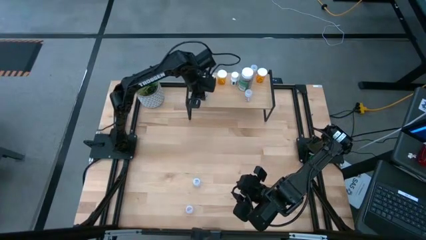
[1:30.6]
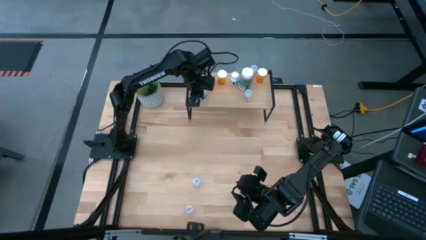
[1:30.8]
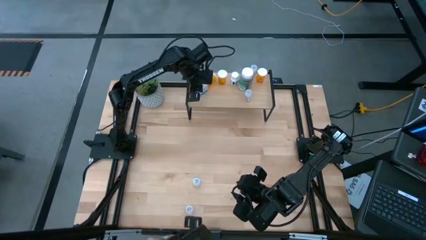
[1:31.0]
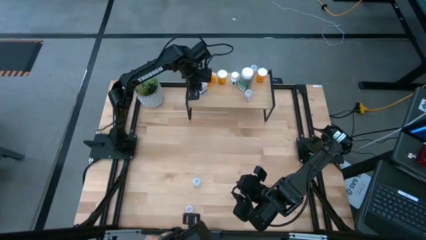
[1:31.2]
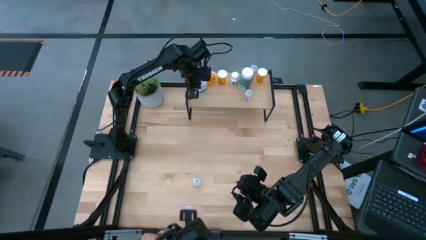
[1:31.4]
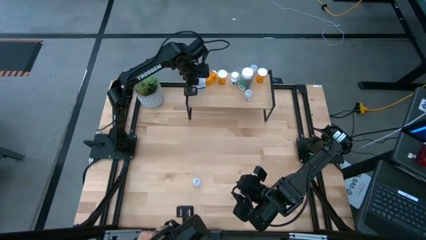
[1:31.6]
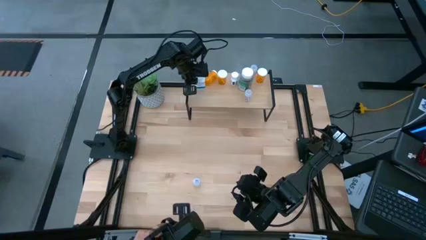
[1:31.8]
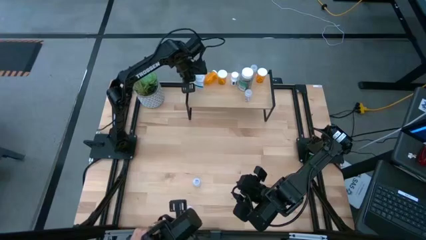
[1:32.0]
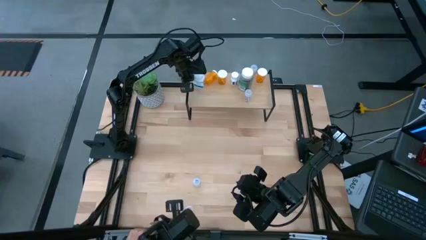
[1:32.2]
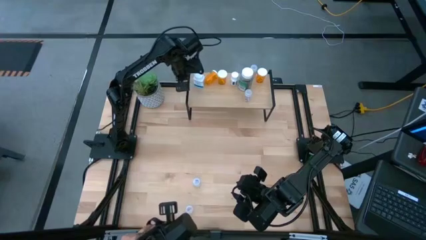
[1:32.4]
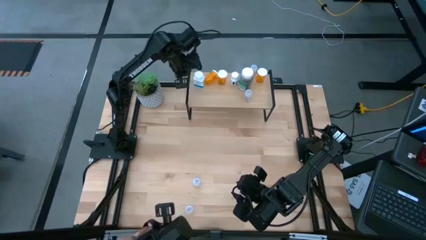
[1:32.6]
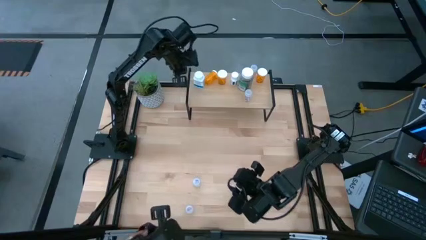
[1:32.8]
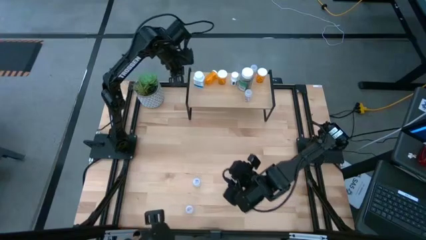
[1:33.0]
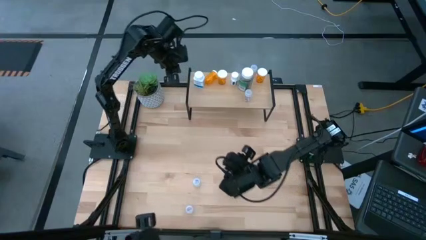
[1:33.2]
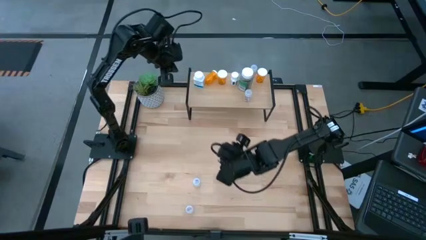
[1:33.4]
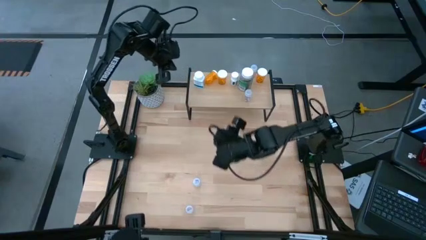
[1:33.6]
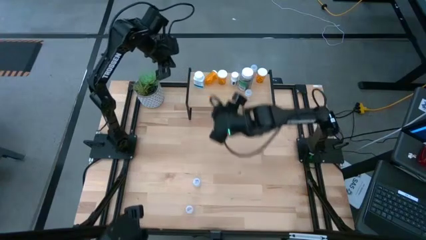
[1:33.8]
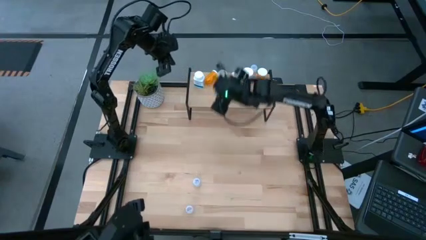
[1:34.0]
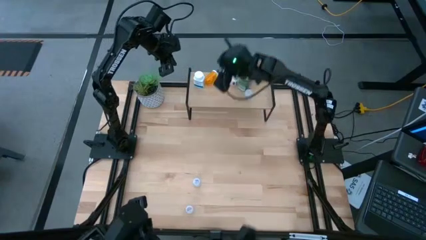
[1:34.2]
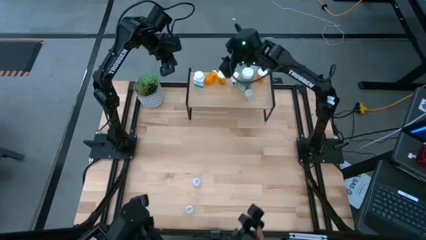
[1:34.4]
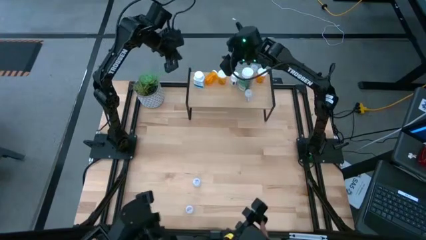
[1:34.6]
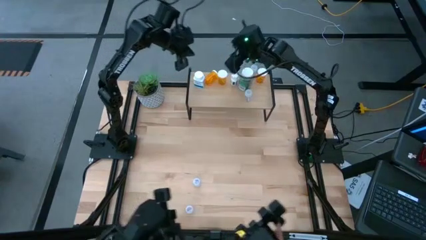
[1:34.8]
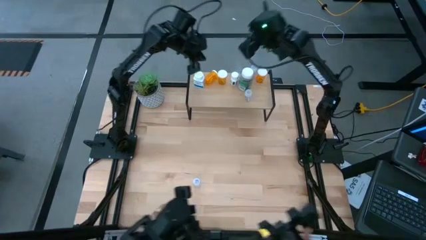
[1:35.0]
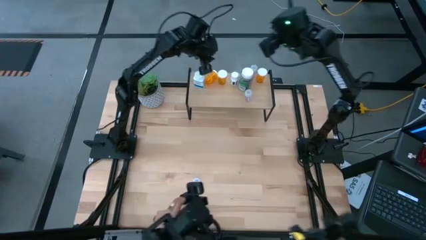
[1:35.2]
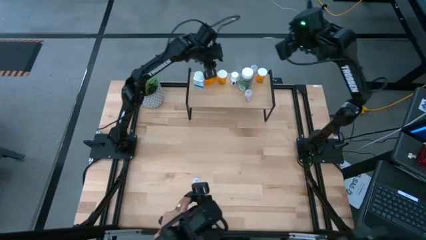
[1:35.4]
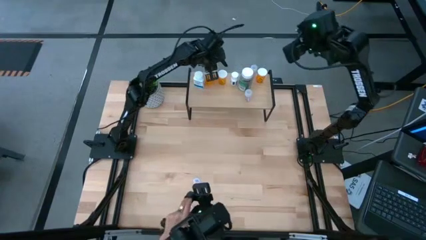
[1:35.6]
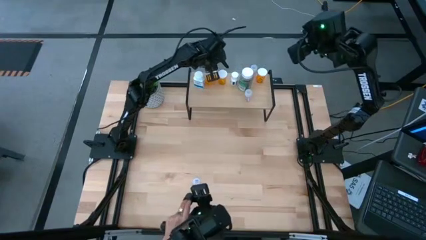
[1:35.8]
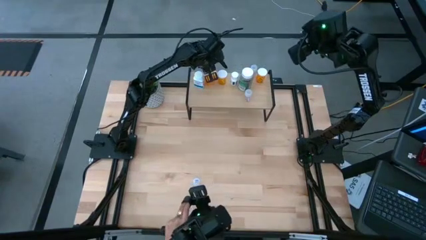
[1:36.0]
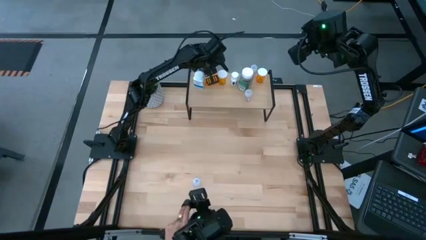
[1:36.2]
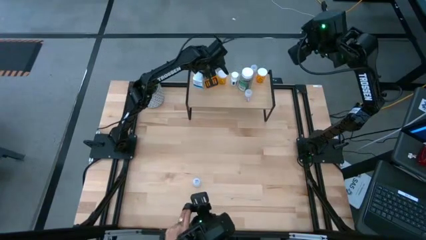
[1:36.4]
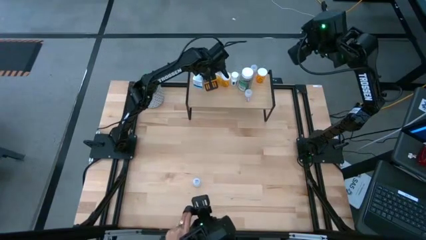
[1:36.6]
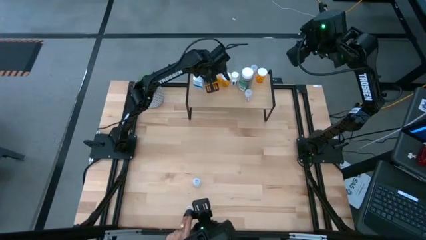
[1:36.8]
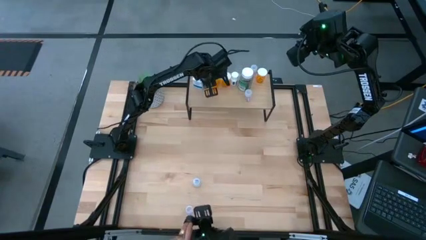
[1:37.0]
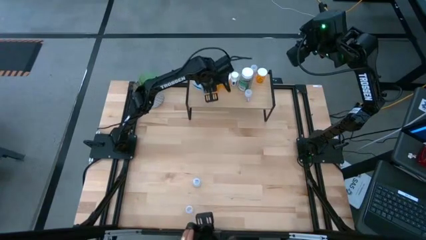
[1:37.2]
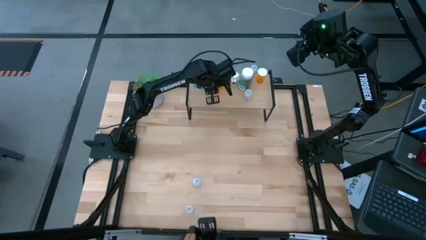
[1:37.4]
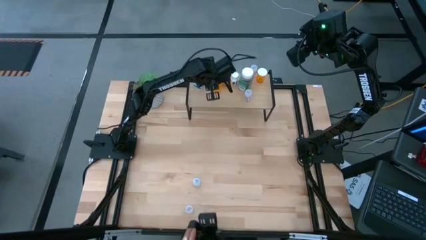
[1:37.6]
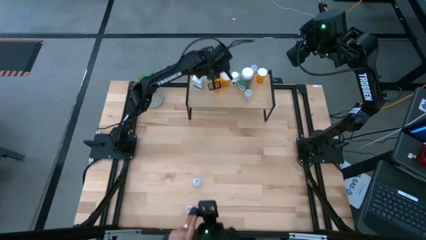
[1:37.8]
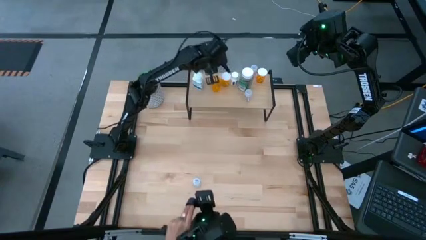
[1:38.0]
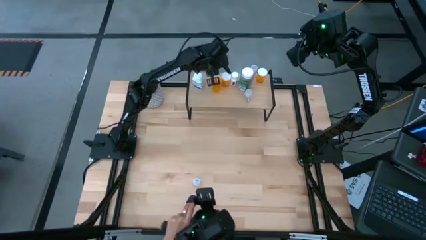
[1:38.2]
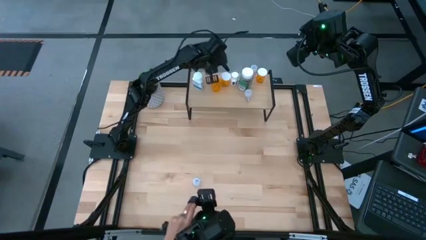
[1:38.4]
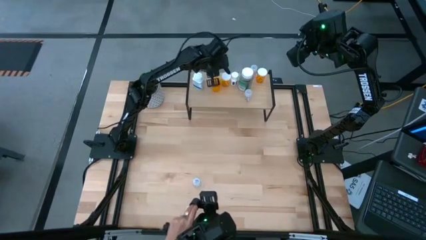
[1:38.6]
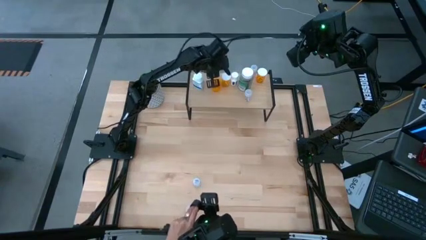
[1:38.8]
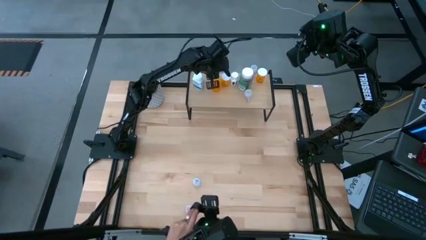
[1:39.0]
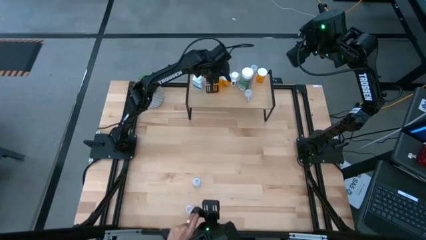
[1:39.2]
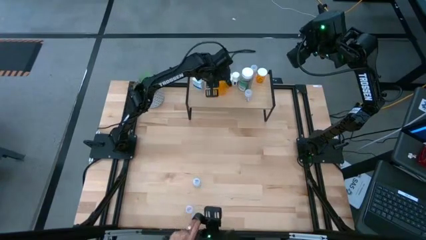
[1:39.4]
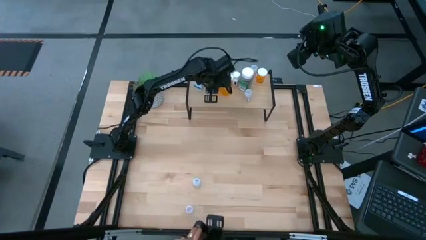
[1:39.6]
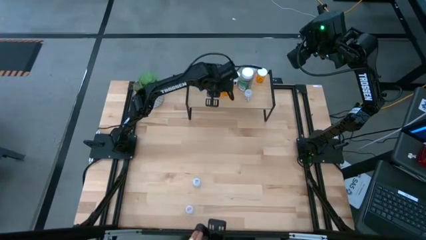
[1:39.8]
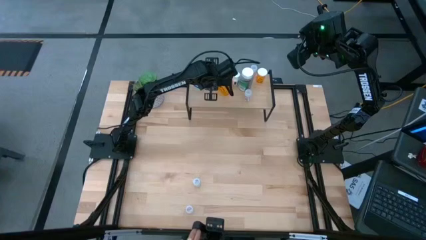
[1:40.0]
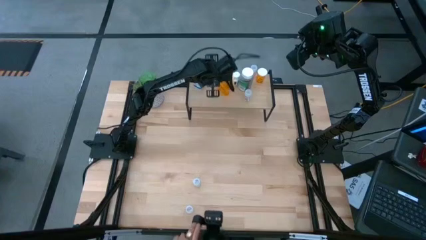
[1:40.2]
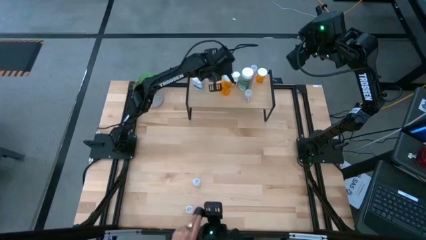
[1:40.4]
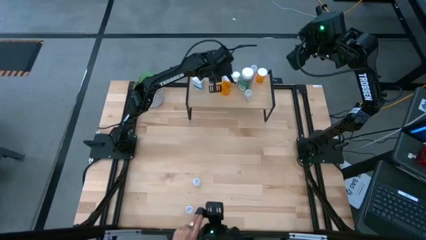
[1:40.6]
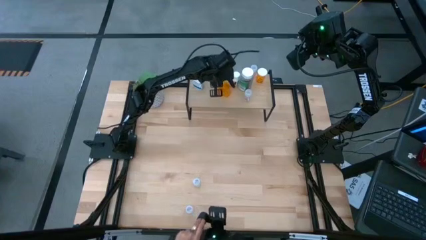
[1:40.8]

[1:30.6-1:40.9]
Task: Pick and place medicine bottles onto shelf by color
Put the orange pill bottle on the shelf

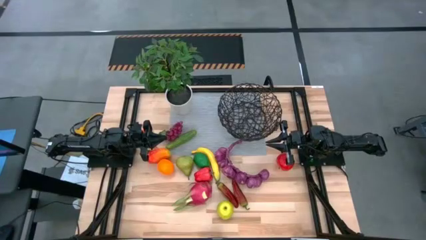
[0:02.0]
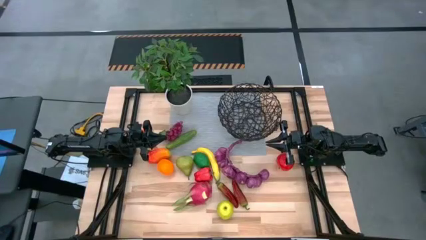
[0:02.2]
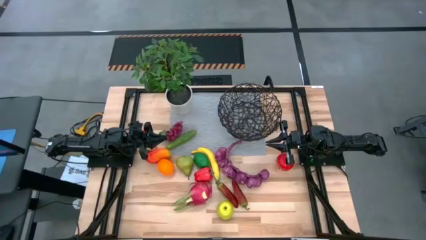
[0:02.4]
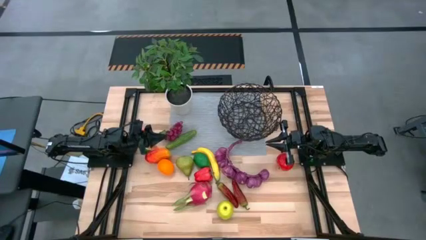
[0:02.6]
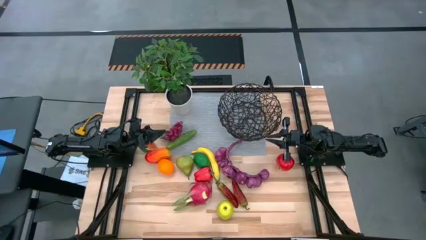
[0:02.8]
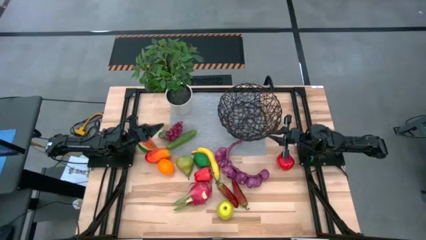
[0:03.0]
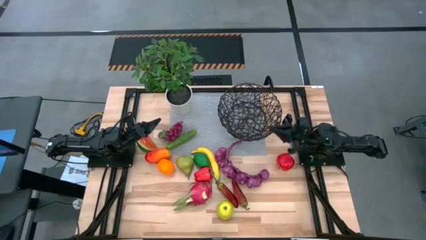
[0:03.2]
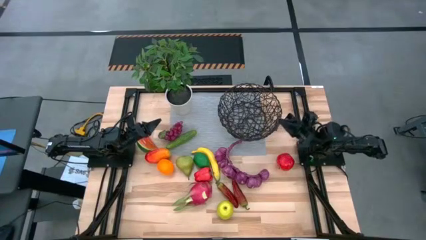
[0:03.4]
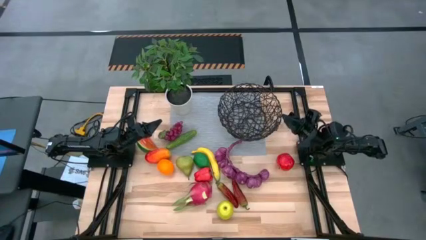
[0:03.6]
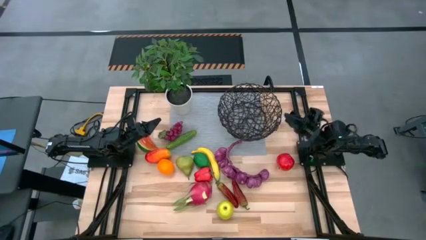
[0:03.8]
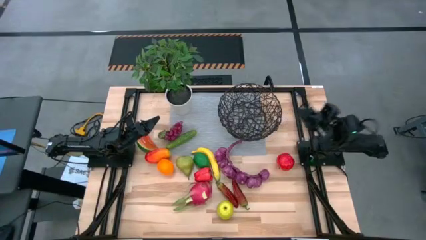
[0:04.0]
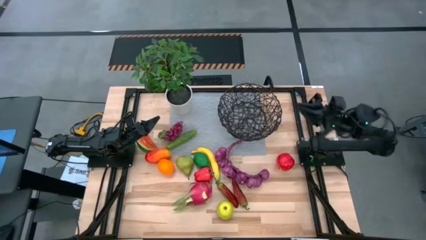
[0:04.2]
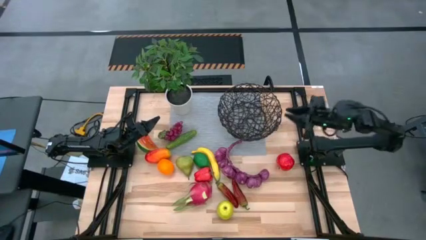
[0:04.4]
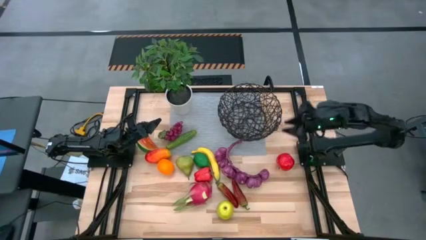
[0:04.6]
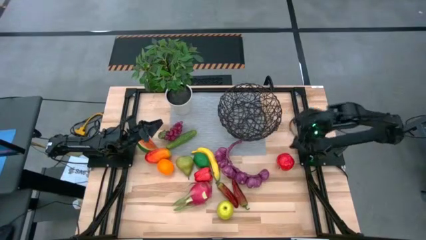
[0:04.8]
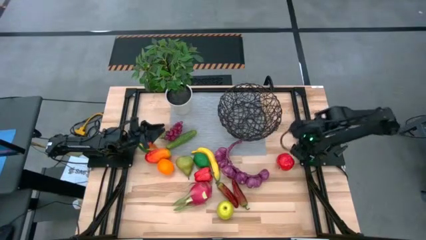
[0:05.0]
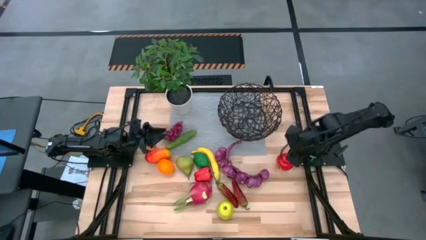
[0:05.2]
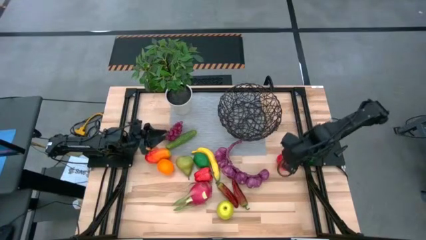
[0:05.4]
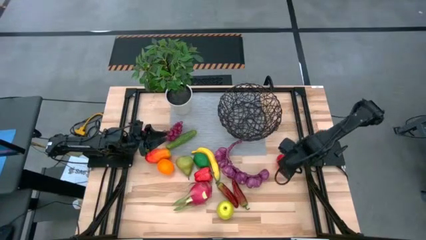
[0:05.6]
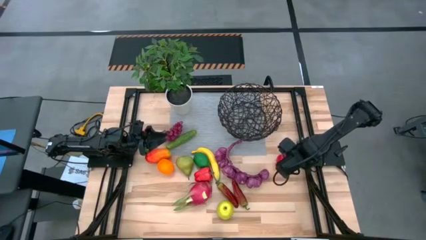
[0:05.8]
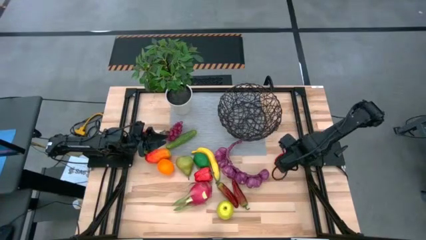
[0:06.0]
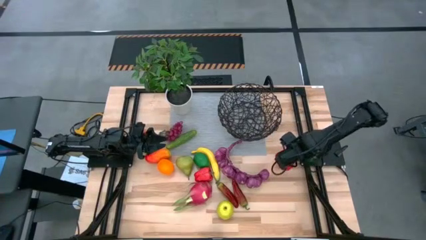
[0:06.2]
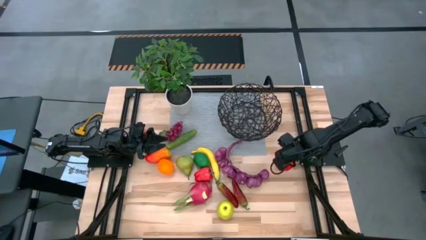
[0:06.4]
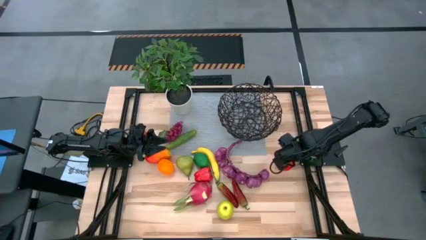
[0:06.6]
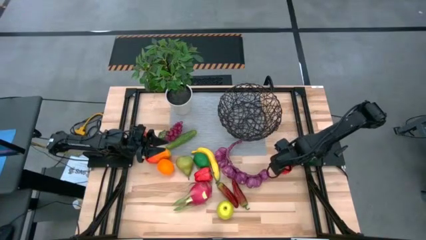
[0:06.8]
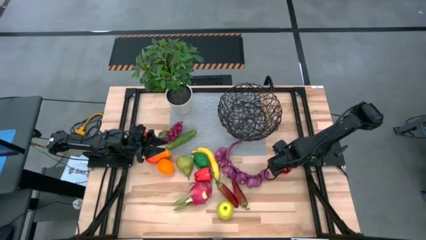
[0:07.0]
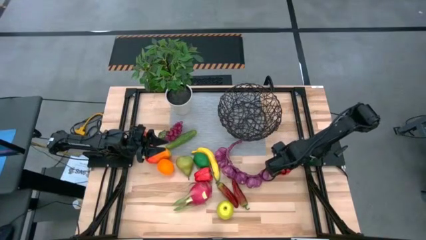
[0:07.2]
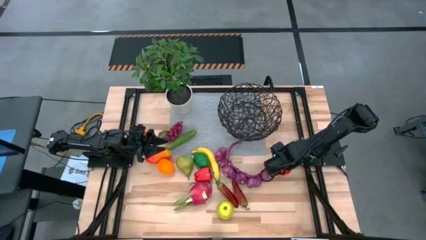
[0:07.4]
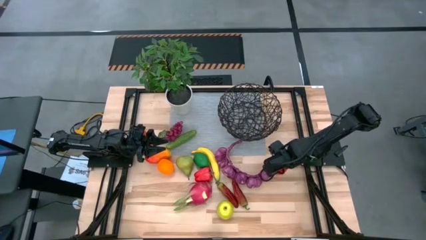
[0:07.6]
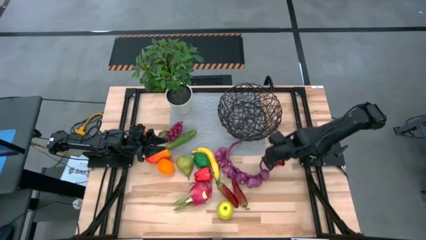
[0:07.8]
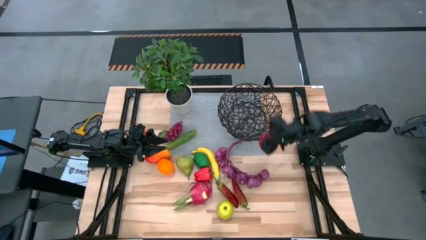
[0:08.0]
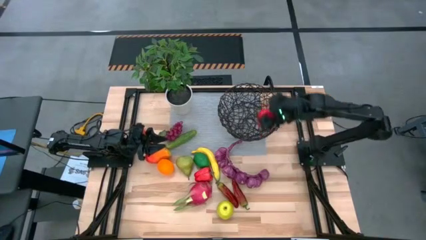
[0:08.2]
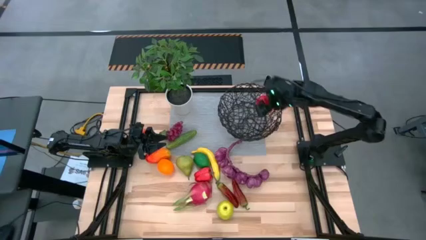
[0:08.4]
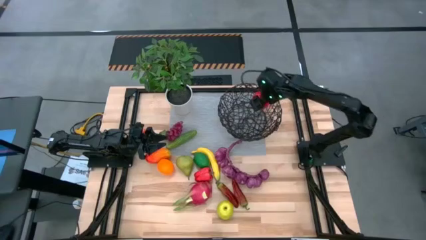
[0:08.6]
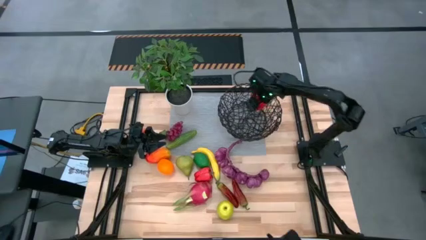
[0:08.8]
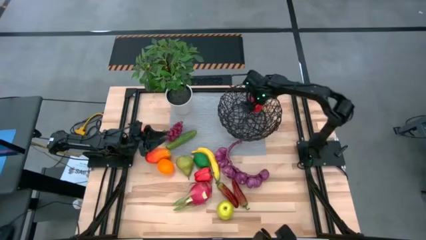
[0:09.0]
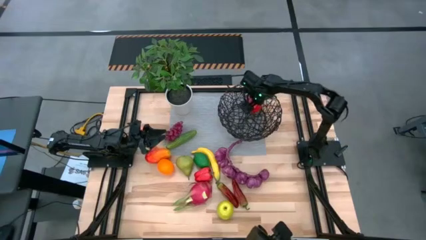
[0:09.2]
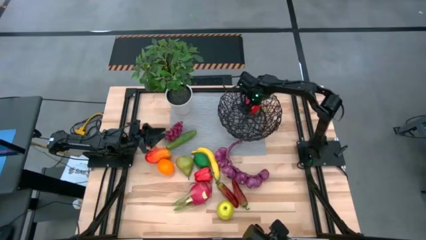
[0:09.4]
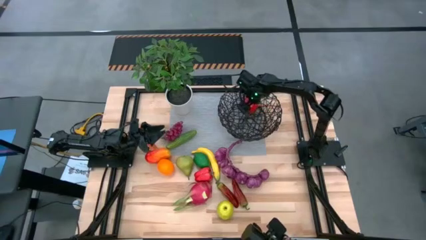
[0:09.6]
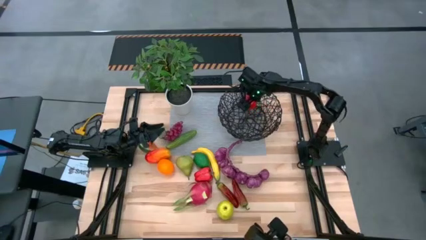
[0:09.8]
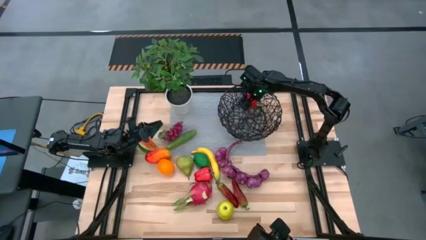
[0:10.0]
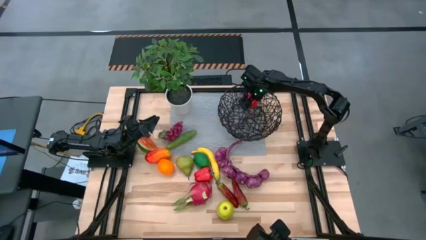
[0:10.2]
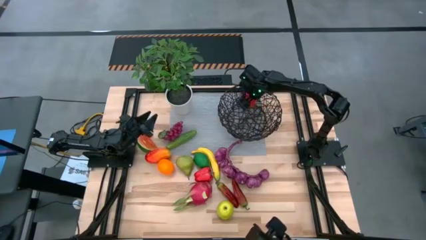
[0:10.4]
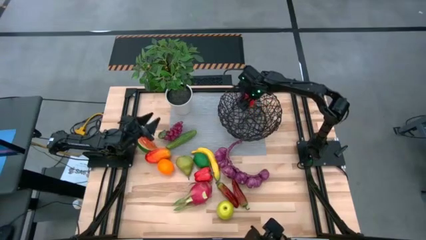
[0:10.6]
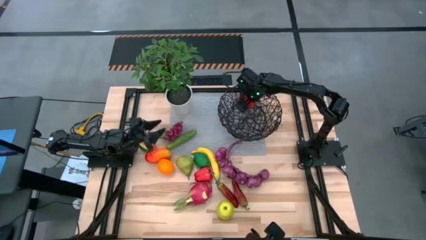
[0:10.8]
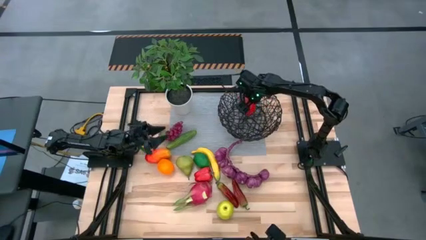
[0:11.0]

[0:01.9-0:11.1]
Task: Build produce basket
Put the red apple into the wire basket
